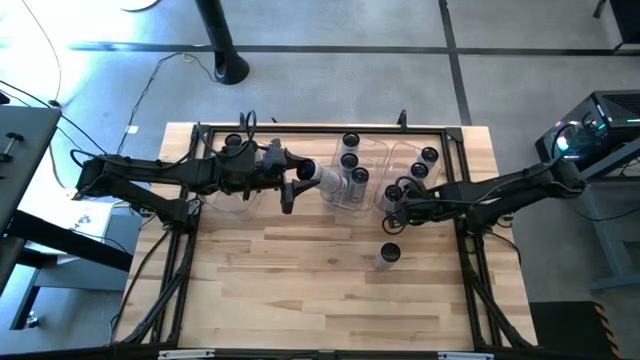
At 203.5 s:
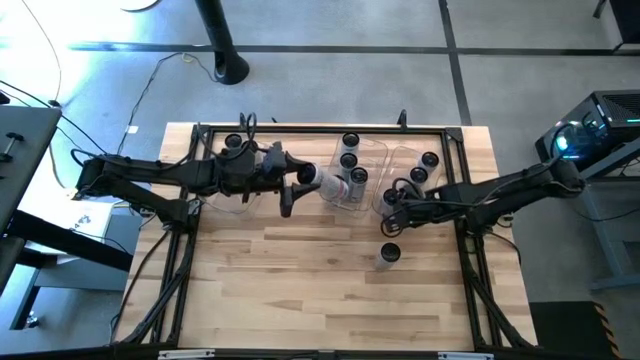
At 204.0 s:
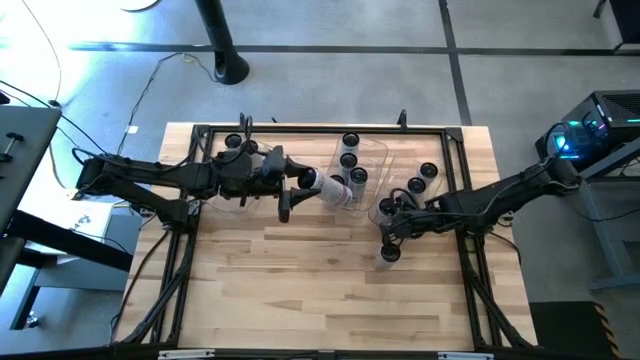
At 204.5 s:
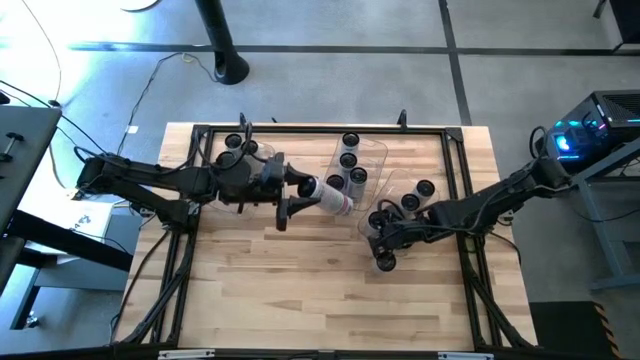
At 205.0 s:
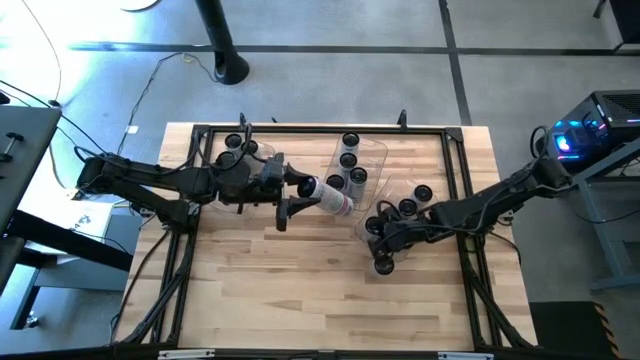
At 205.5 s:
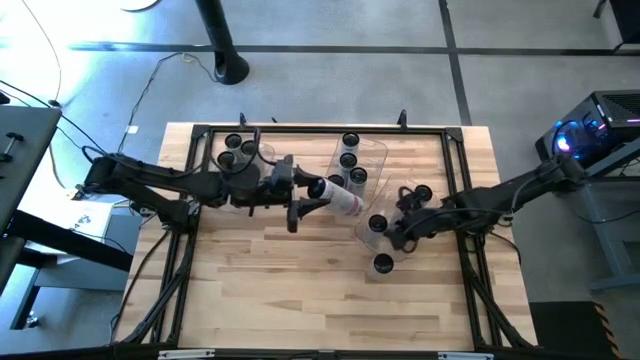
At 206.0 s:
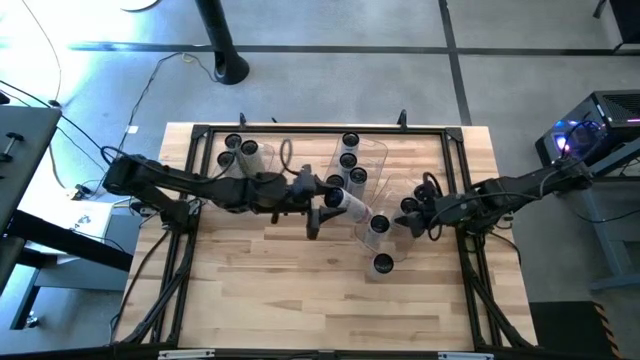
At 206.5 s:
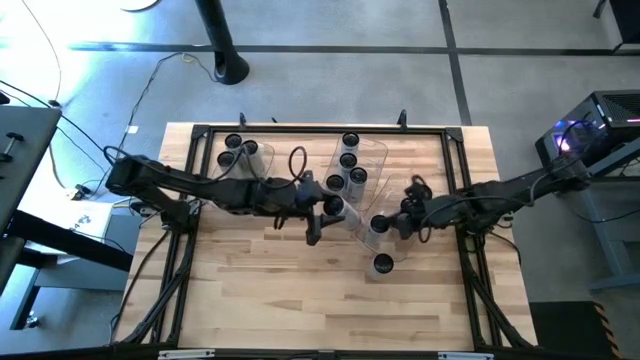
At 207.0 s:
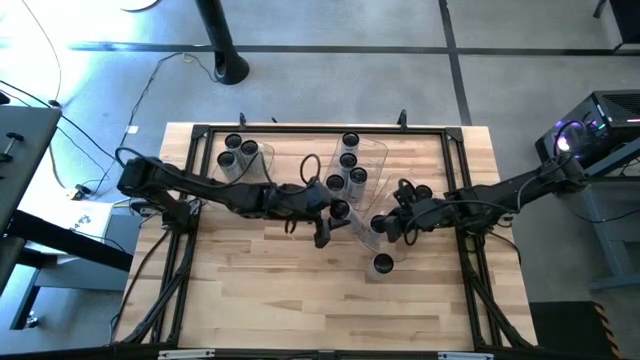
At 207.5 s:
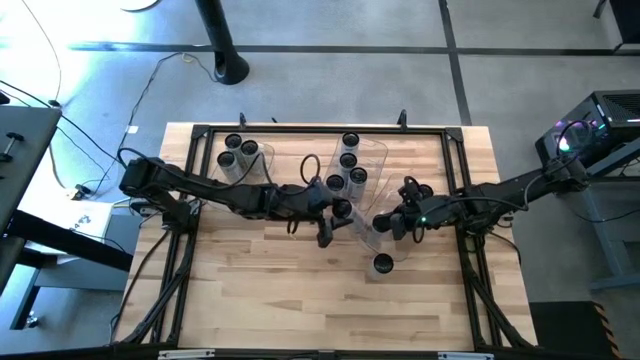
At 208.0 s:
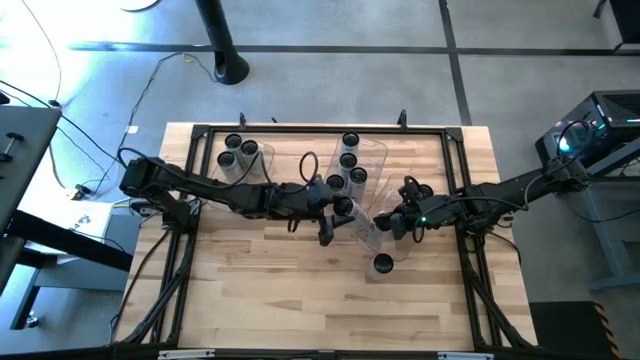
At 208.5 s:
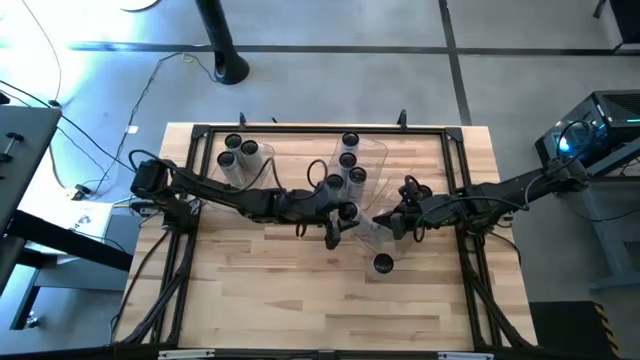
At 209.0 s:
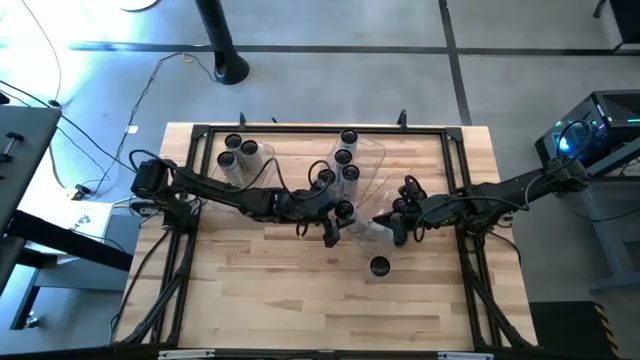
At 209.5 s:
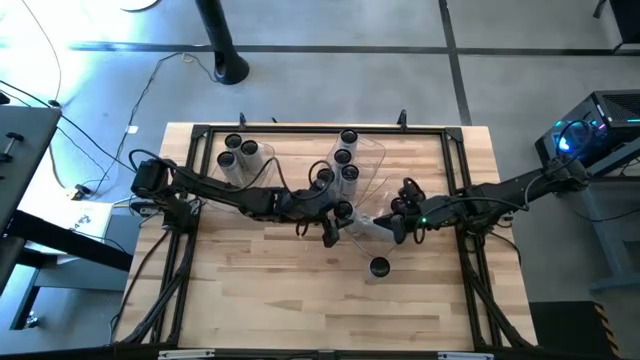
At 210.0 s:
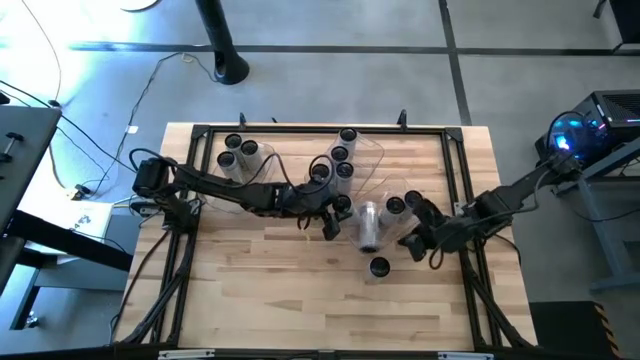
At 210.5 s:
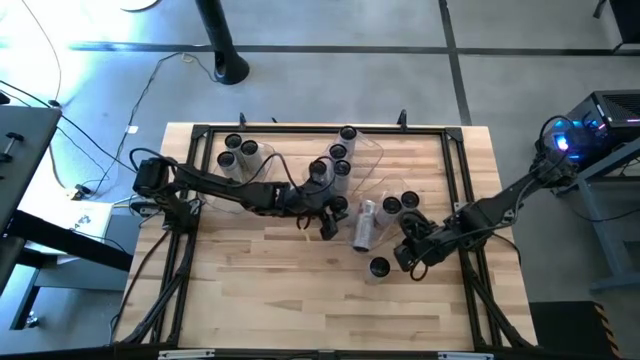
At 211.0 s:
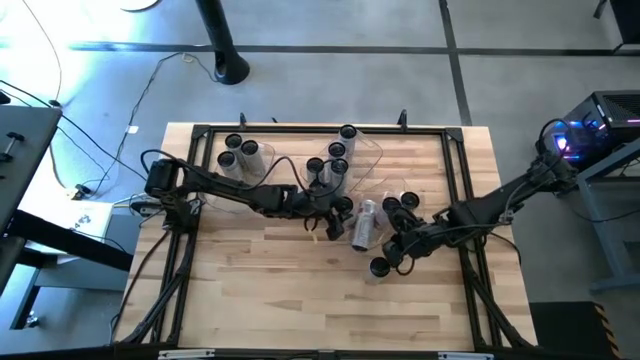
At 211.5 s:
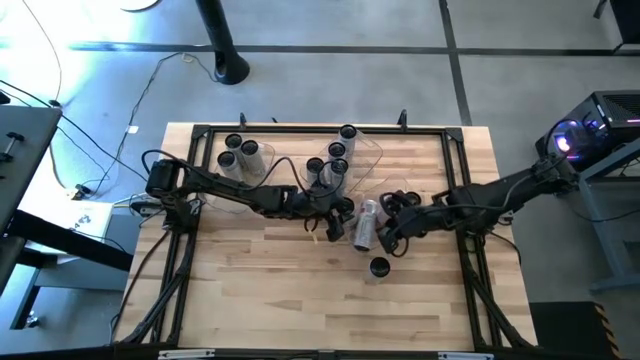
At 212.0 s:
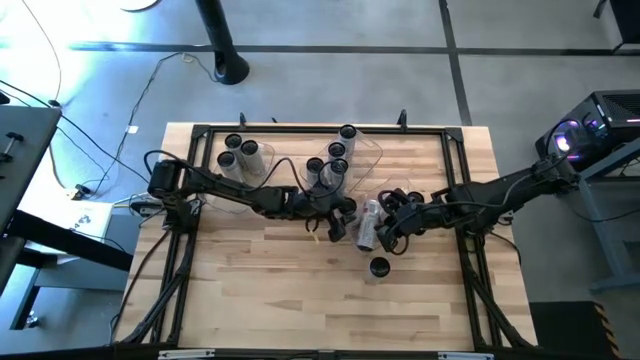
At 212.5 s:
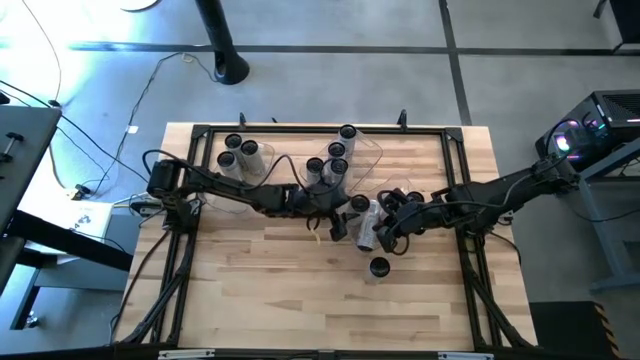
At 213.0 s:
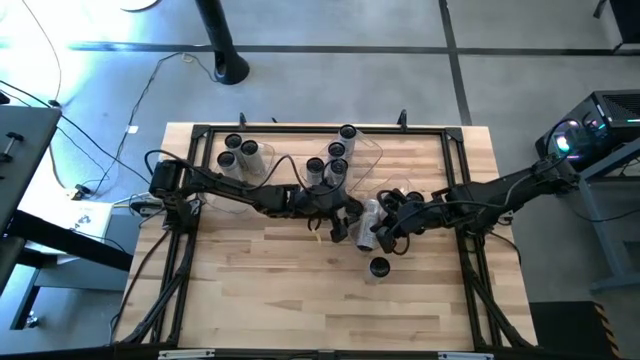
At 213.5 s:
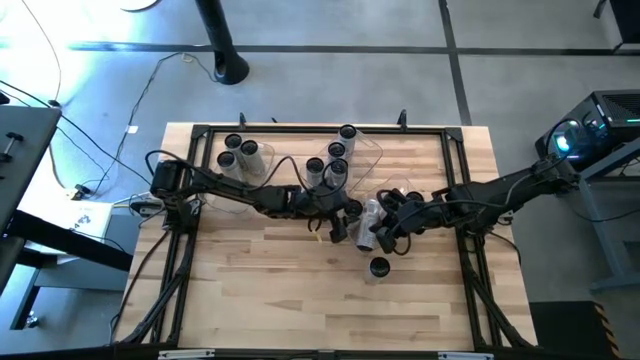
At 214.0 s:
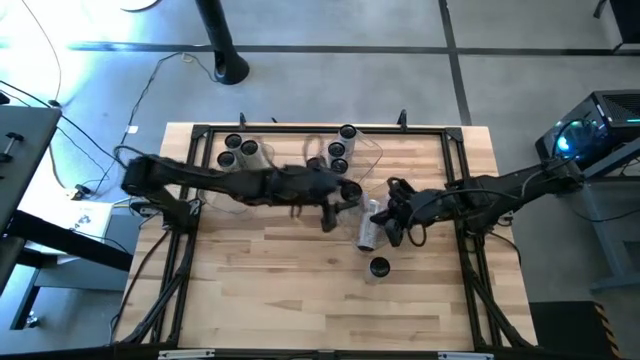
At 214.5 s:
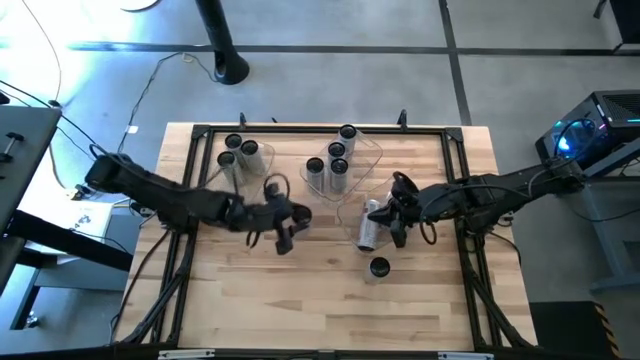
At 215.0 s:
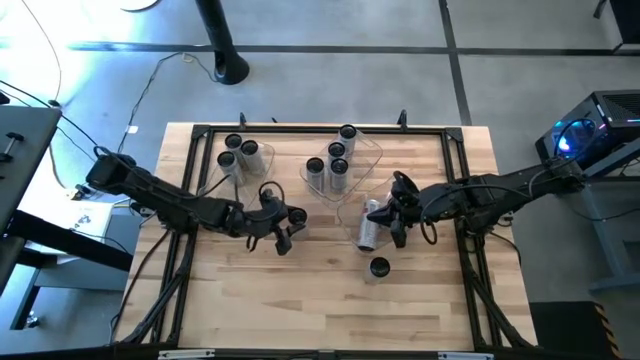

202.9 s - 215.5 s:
Task: Sort soda cans
Put the white-pink soda can into the top right transparent bin

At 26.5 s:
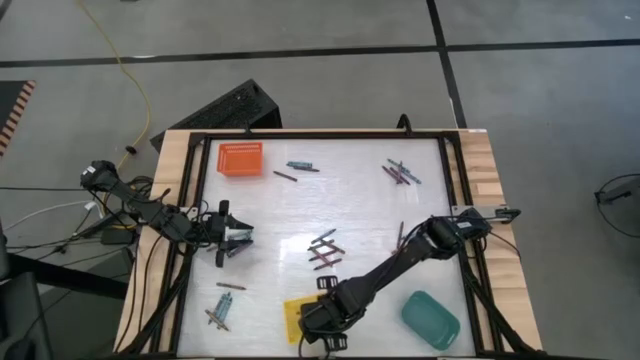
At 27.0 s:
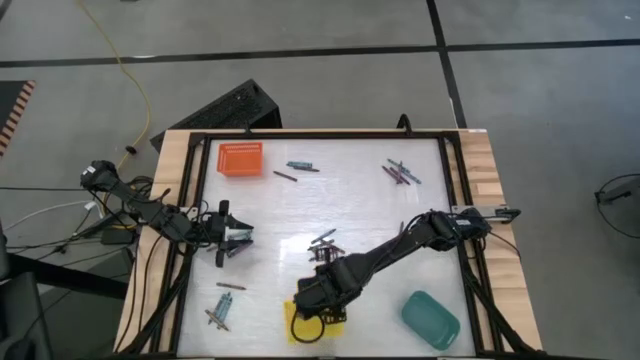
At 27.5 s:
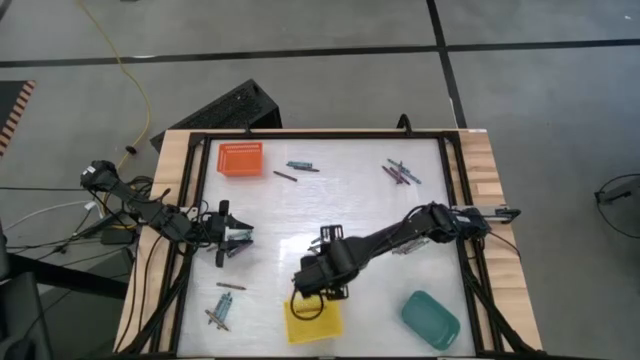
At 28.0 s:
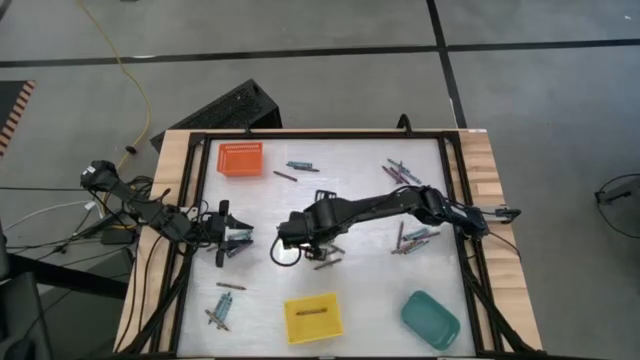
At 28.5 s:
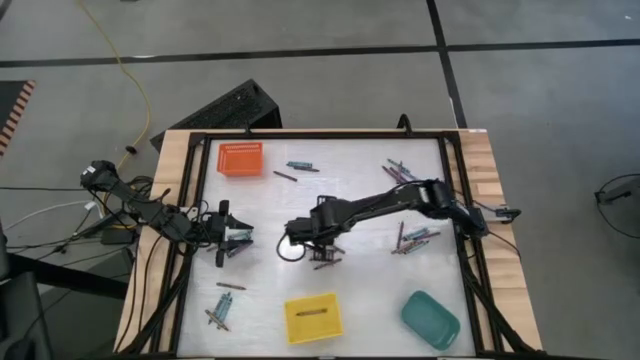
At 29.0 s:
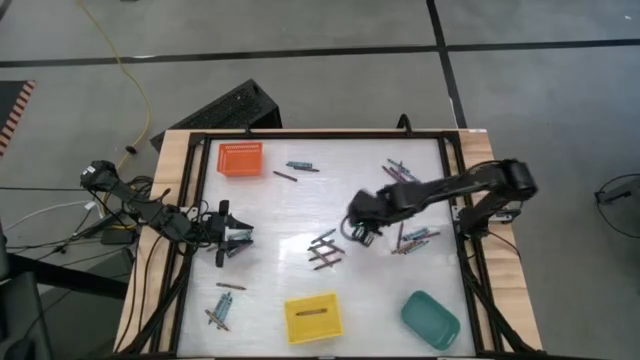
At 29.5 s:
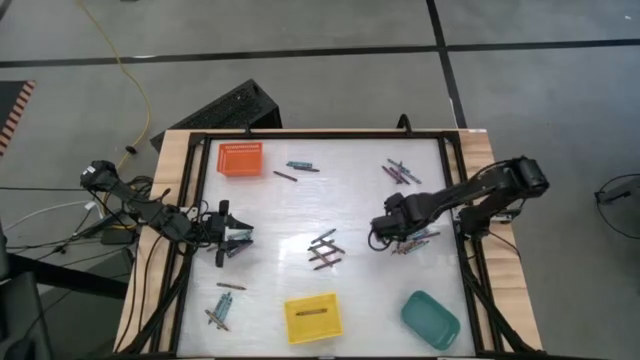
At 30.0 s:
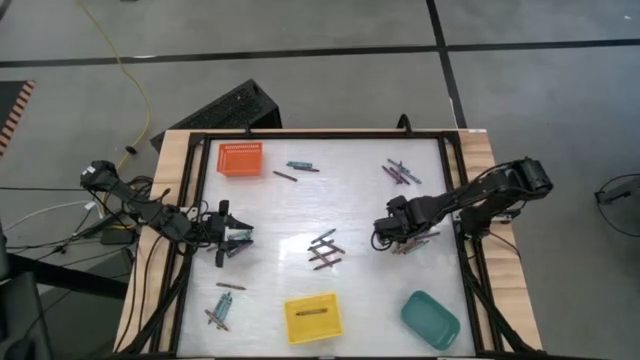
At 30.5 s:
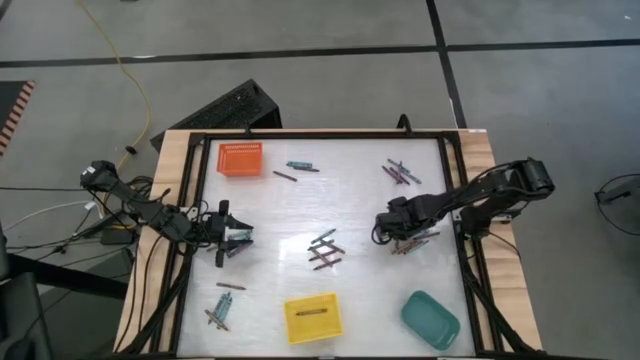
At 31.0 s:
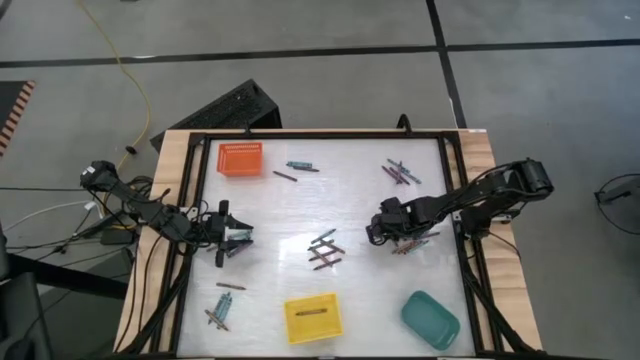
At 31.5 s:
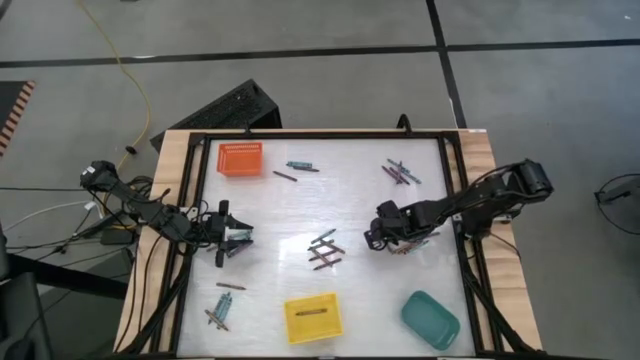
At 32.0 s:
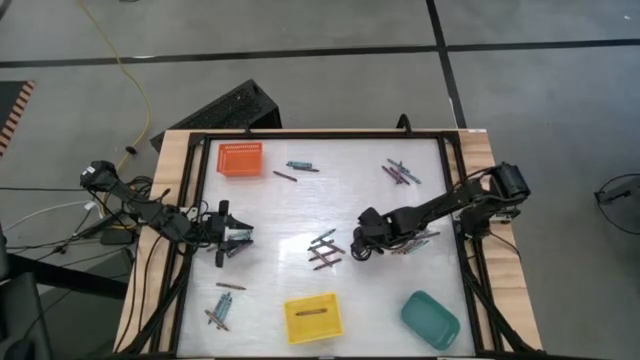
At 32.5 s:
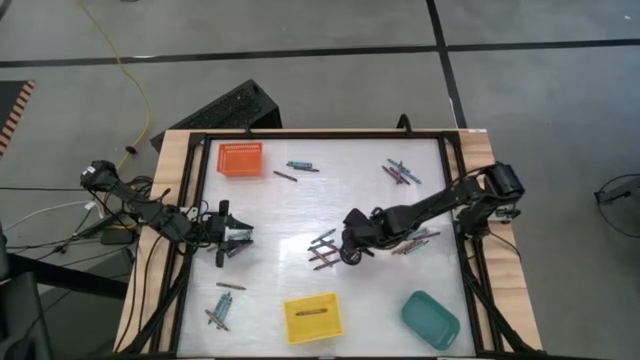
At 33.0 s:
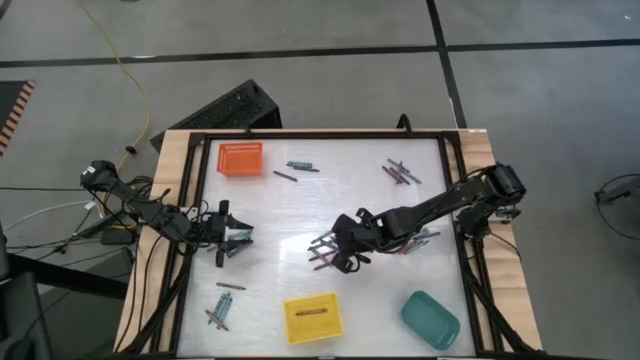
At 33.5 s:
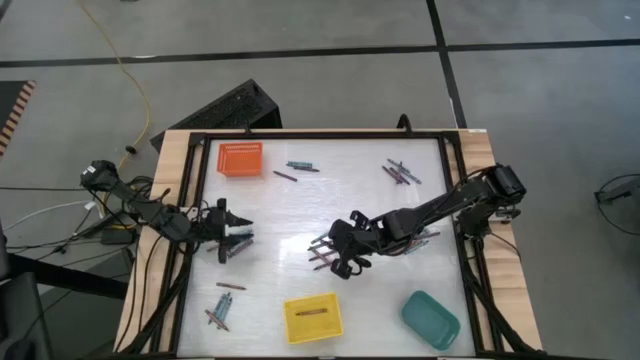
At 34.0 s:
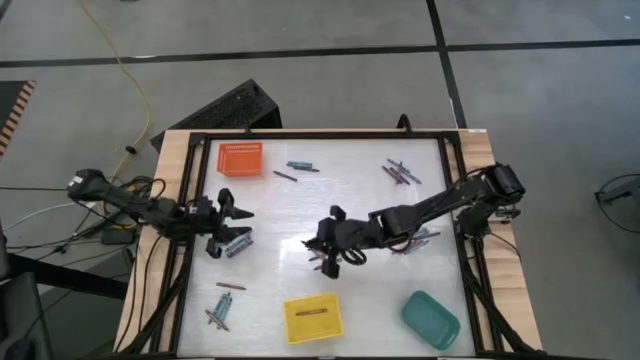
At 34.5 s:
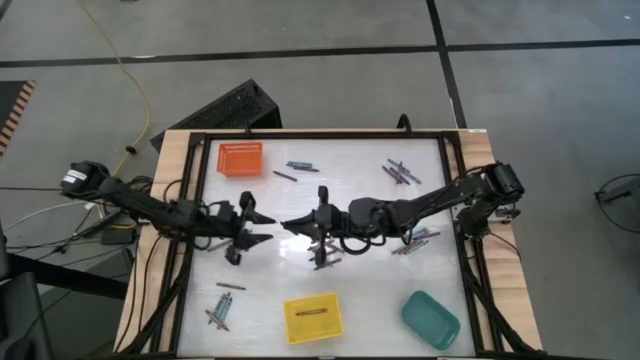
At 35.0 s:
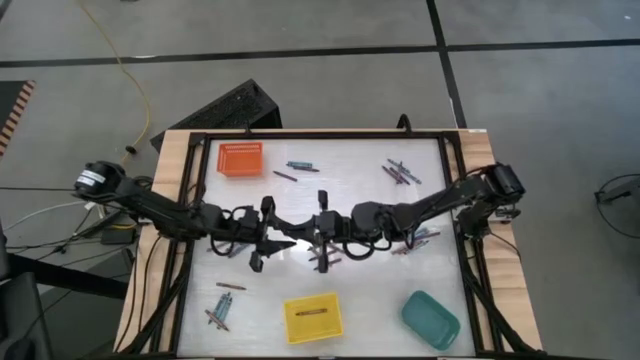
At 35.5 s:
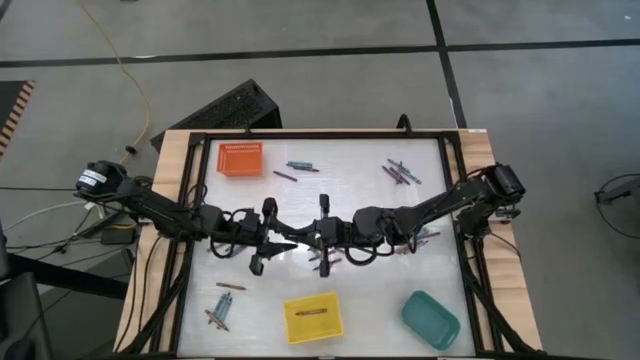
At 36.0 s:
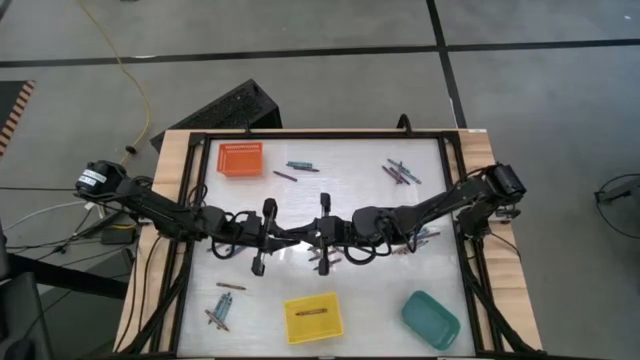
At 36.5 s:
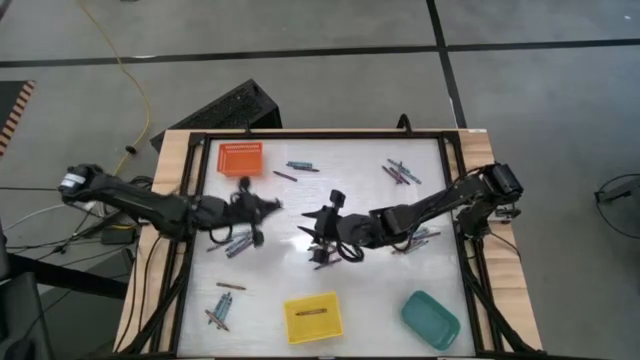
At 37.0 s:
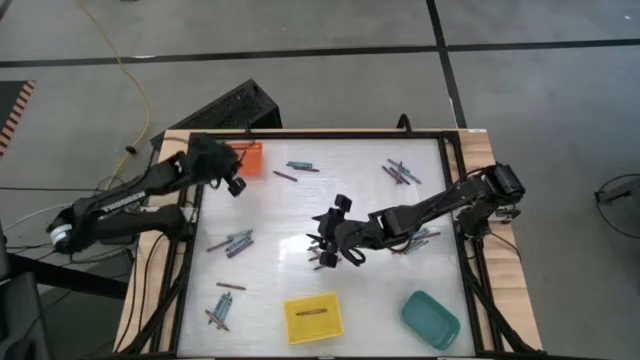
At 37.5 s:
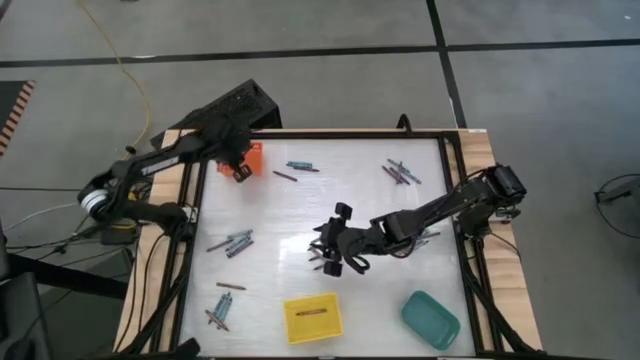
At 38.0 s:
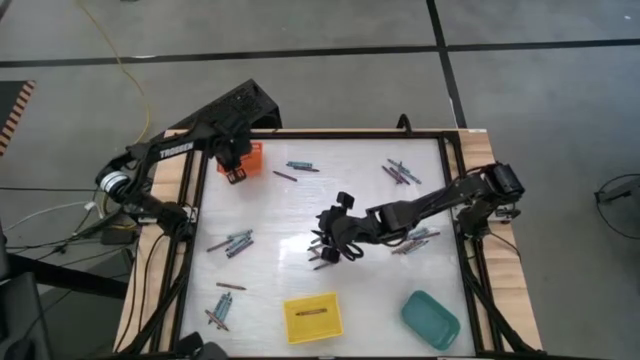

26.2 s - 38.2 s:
Task: Sort crayons
Put the purple crayon into the orange bin
